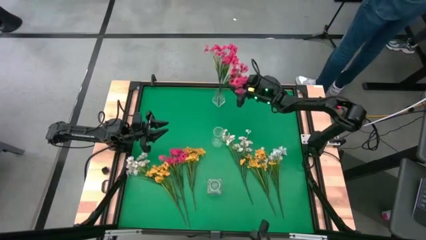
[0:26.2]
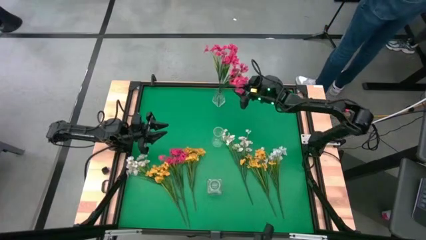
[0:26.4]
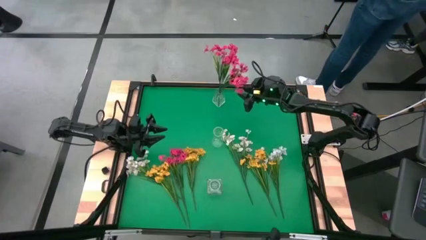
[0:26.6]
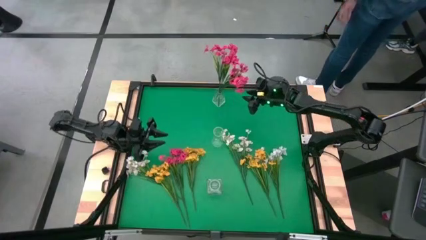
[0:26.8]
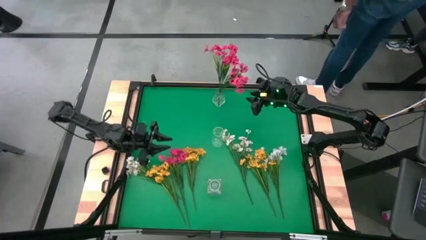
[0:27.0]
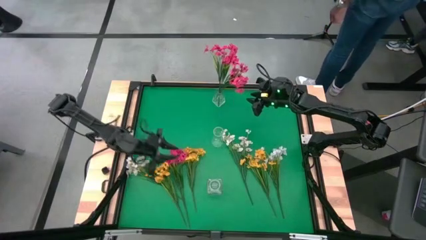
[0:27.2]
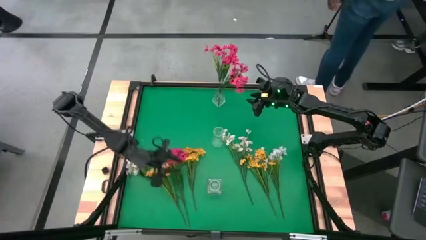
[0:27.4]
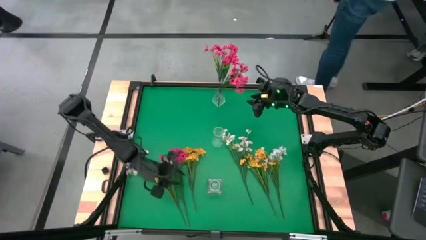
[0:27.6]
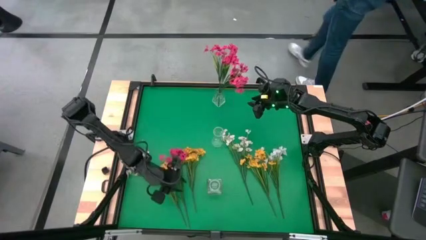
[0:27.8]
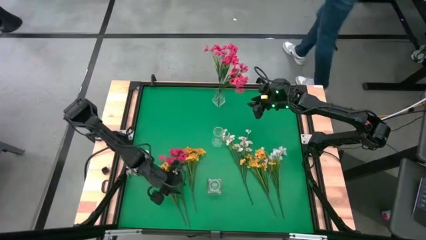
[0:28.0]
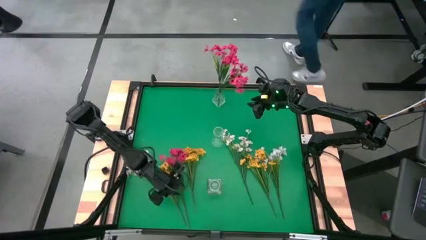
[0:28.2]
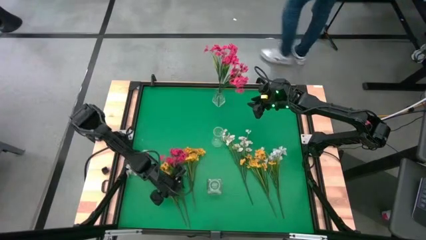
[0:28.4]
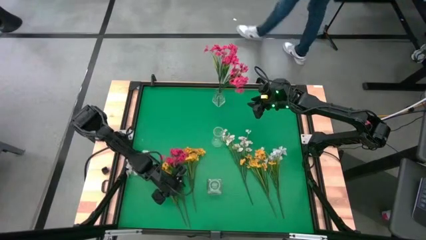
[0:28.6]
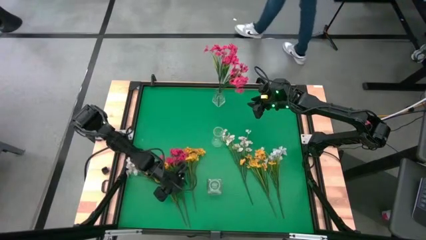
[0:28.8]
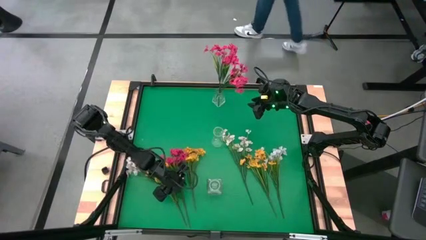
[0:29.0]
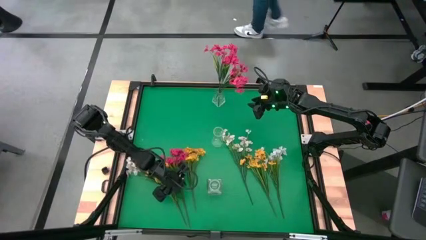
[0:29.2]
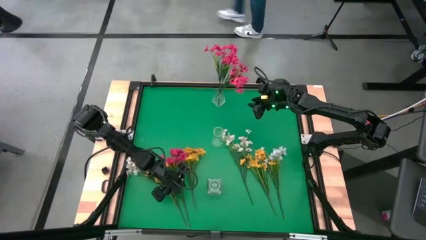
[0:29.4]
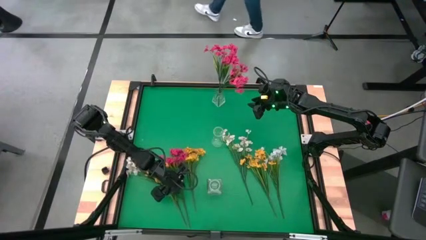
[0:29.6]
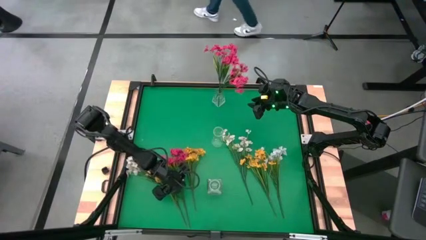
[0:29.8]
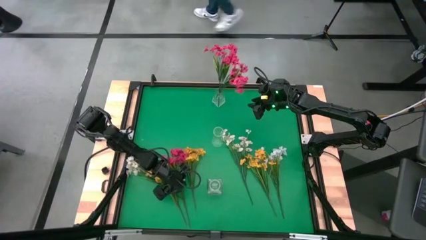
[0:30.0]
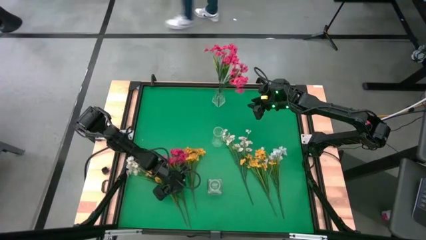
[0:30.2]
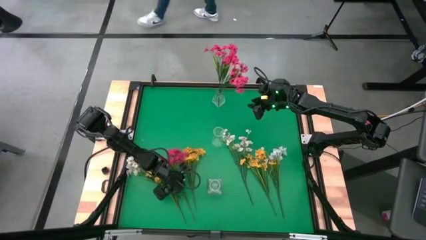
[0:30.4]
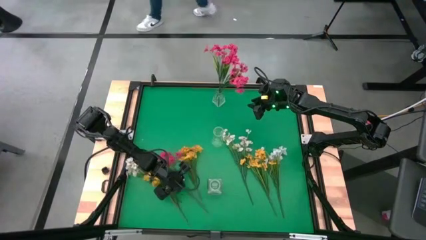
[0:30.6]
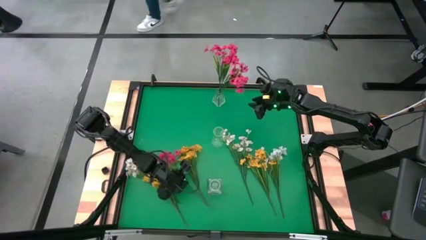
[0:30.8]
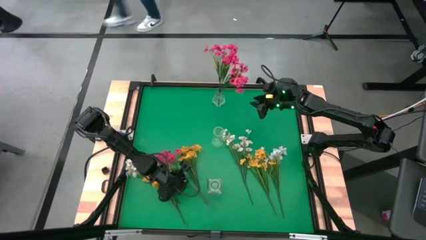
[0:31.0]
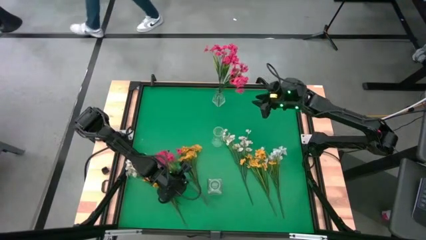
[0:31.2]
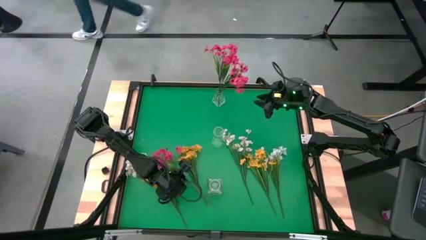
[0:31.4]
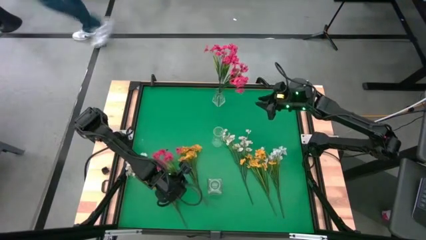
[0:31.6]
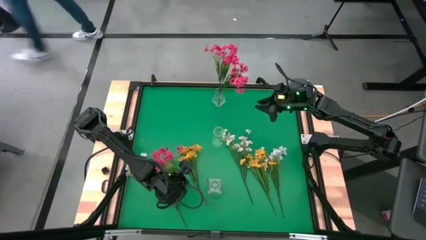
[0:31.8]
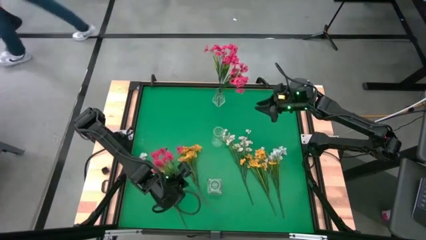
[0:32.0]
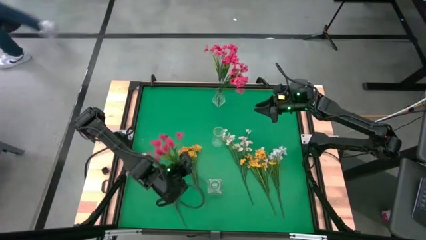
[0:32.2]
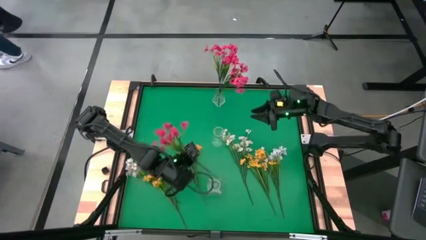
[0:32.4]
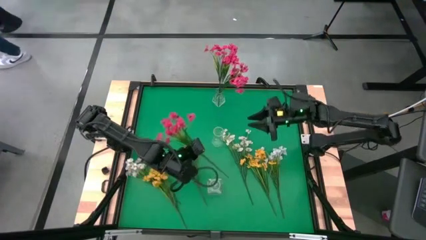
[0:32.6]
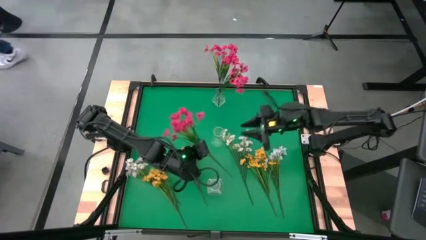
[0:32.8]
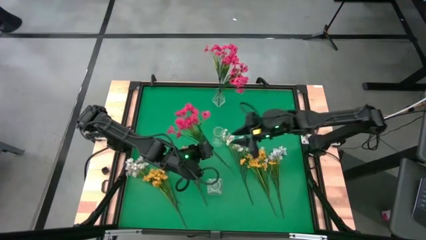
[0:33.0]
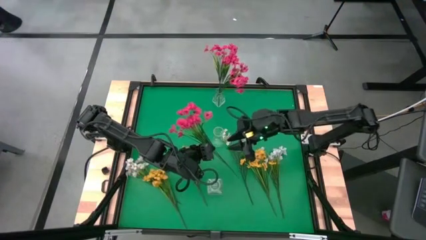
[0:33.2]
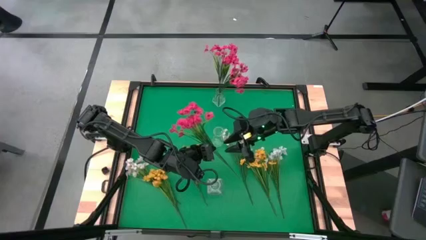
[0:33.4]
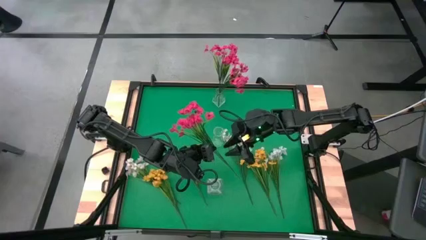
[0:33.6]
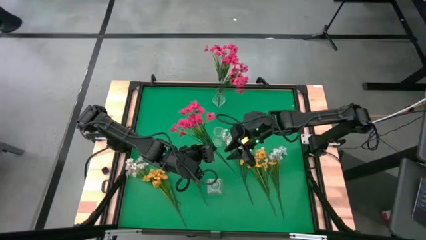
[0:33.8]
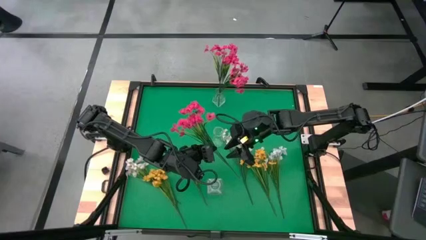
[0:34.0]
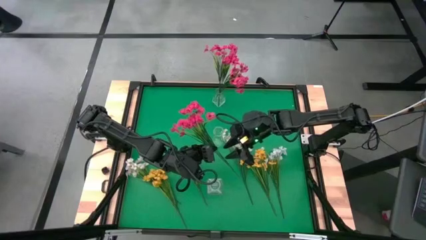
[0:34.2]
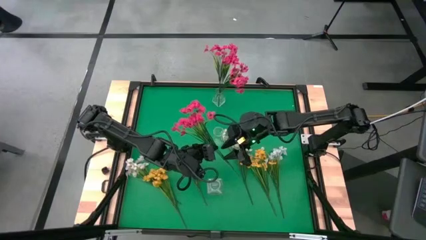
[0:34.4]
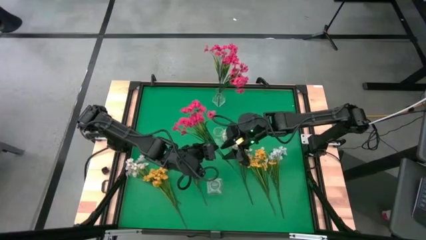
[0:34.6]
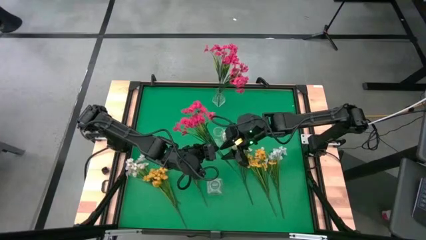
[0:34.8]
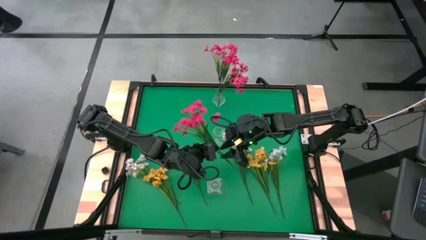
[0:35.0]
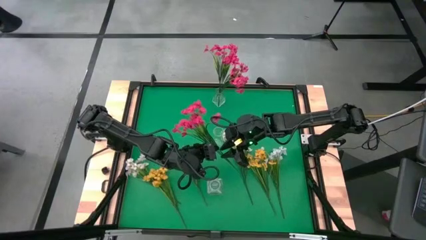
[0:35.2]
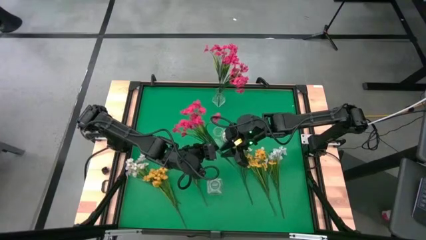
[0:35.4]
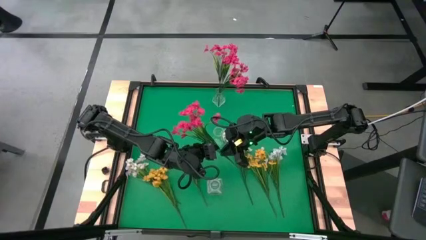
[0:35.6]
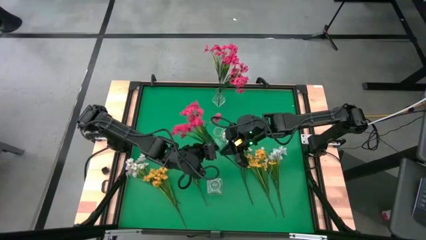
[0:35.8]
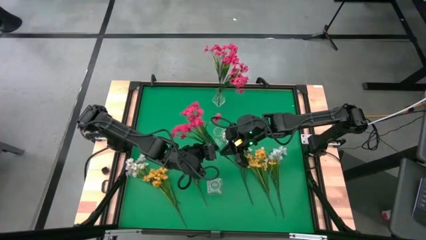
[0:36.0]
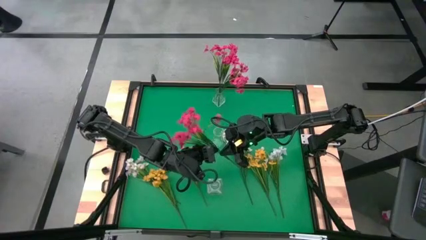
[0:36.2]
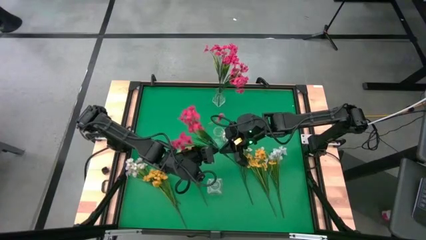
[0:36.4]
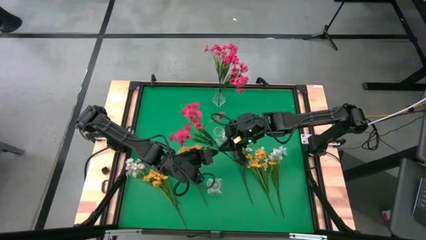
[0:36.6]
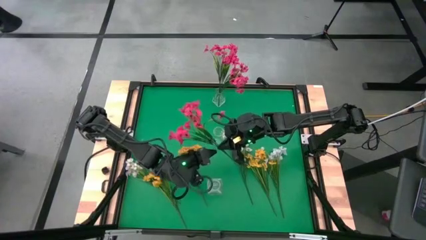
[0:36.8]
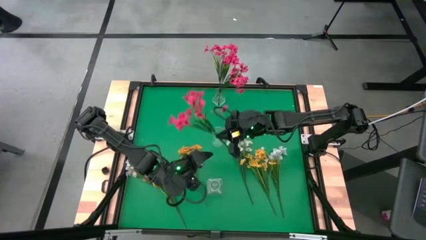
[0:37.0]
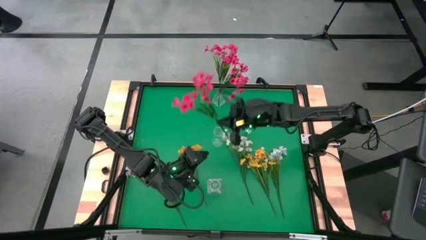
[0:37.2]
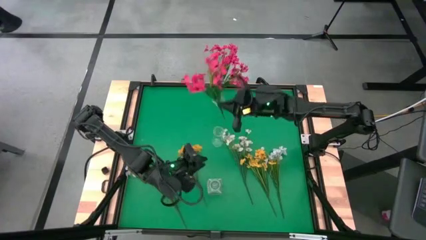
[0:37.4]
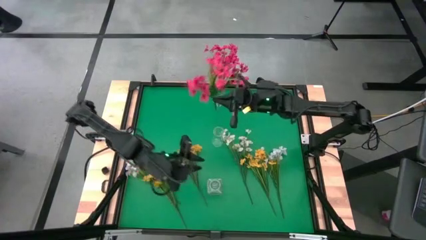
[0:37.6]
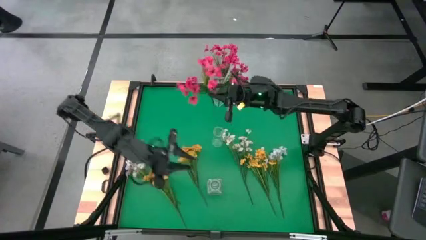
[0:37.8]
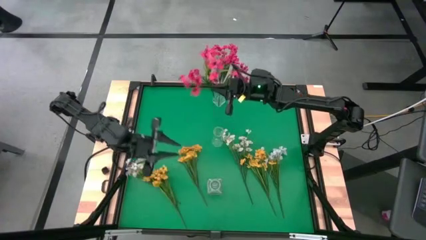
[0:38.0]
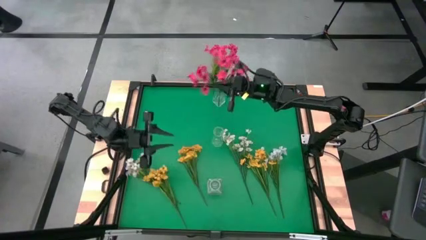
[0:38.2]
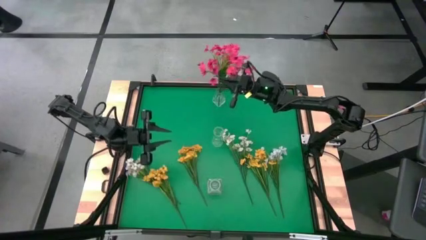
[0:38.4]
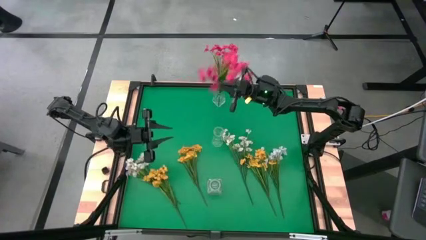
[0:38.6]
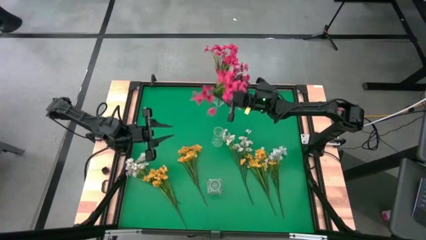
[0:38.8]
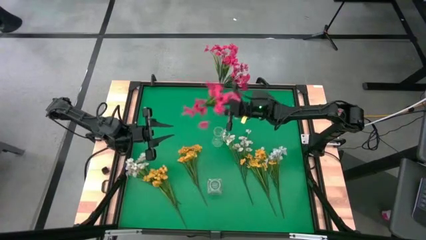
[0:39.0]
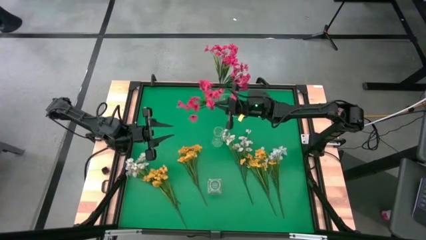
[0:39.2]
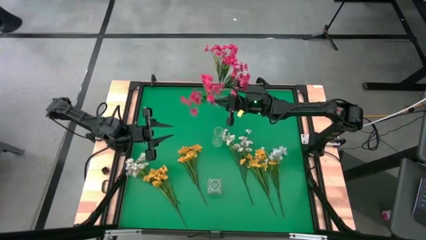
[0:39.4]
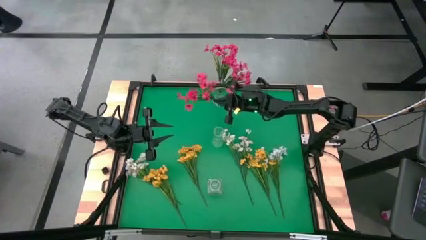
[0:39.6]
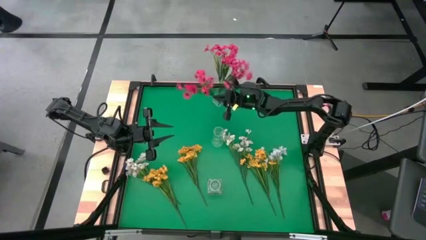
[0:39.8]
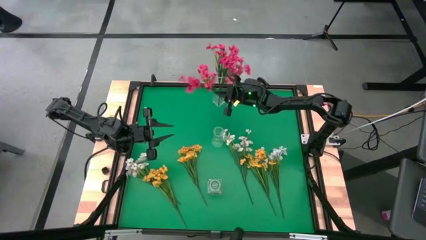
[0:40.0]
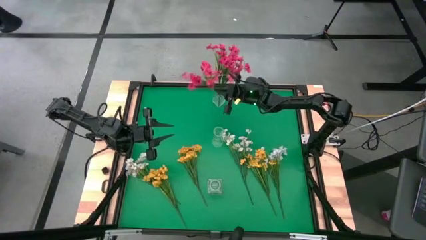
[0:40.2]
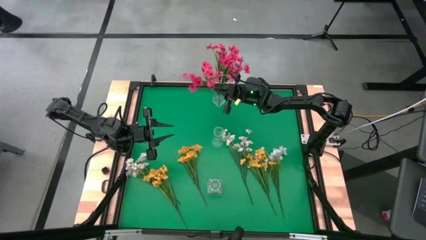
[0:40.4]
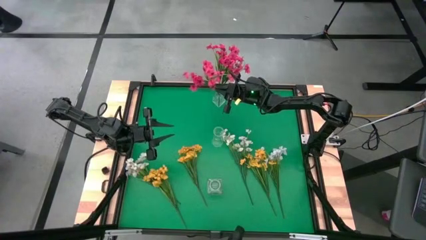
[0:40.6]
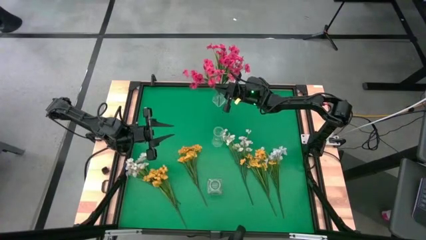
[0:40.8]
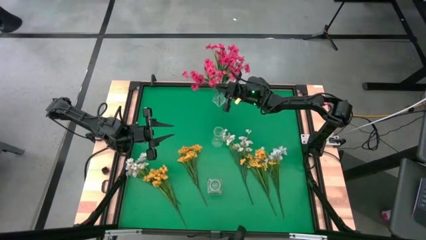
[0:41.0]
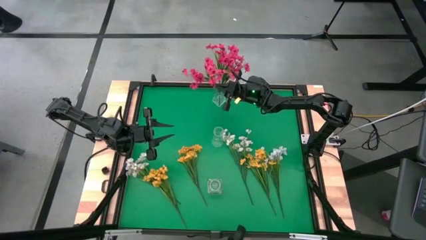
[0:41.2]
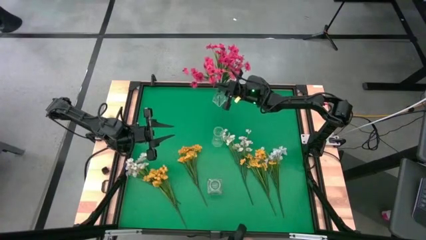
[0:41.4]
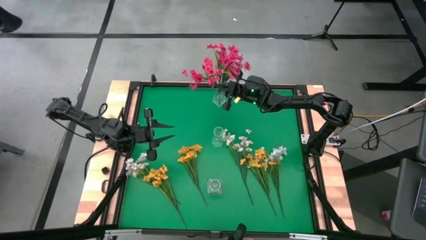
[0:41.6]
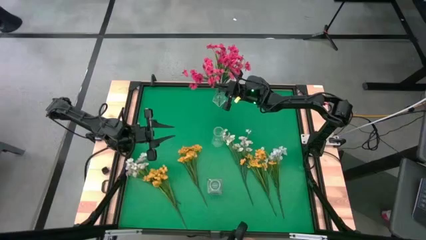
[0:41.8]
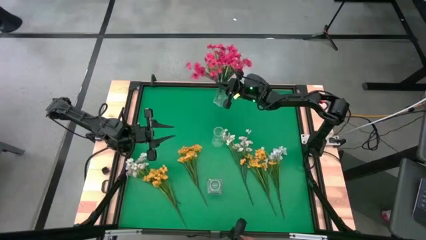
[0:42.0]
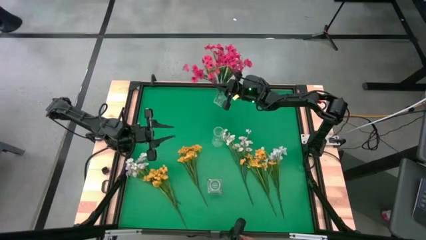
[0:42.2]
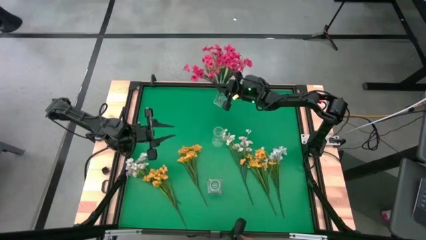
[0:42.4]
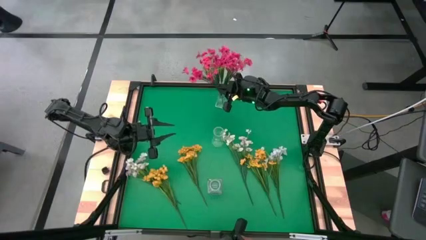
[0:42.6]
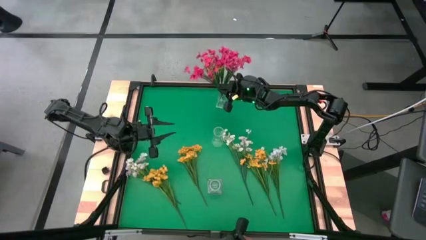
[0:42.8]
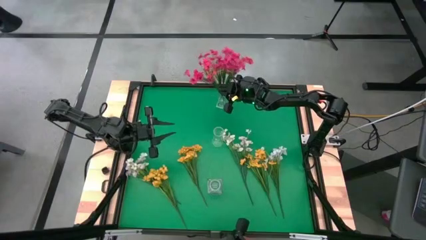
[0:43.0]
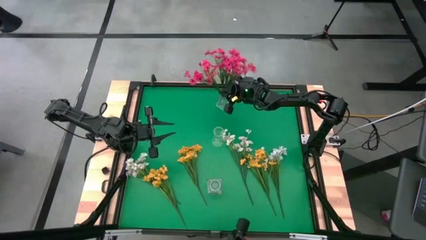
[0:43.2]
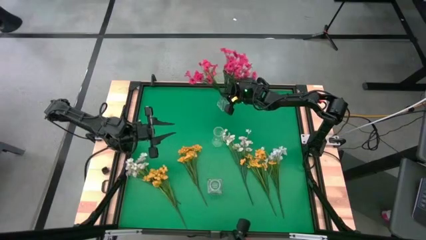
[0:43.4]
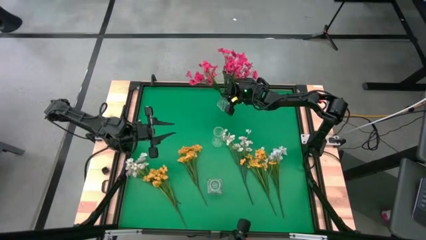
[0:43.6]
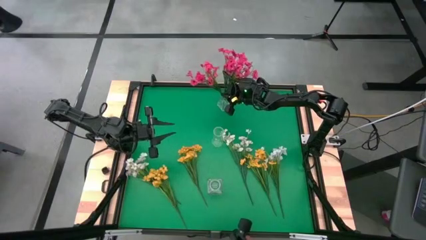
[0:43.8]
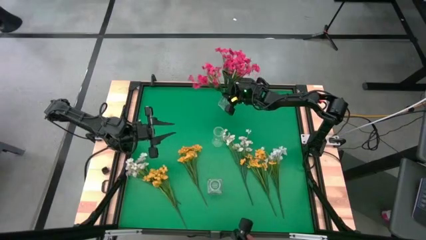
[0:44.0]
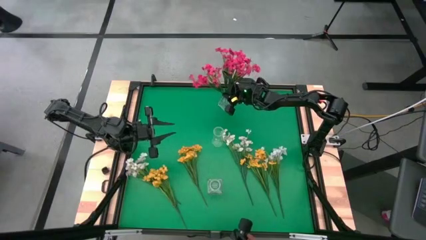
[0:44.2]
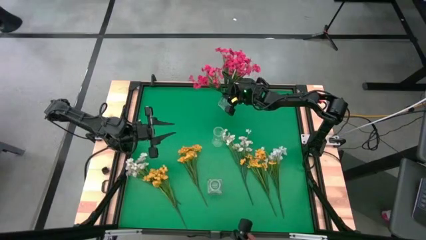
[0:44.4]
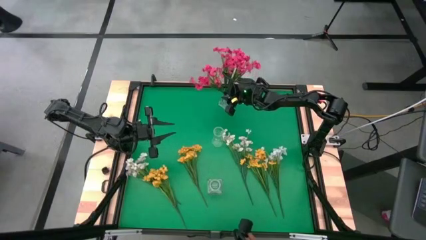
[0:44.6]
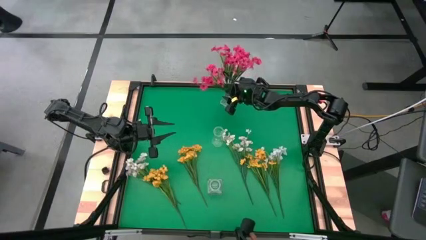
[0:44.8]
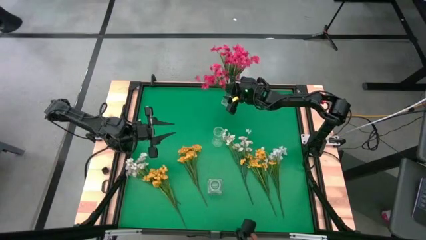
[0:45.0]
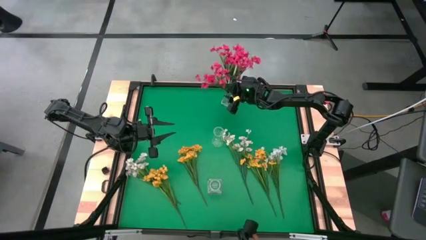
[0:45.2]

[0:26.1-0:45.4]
Task: Sort flowers into vase by color
Put the pink flowers into the top transparent vase
